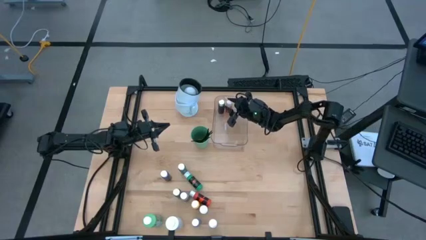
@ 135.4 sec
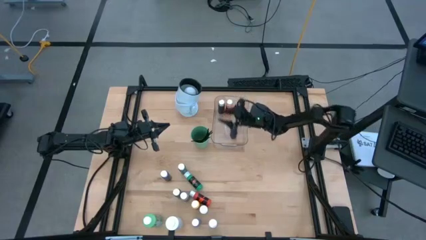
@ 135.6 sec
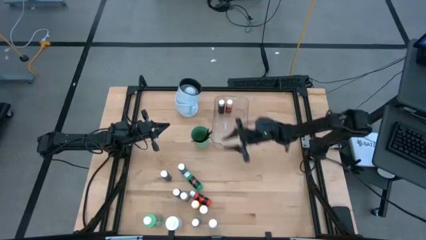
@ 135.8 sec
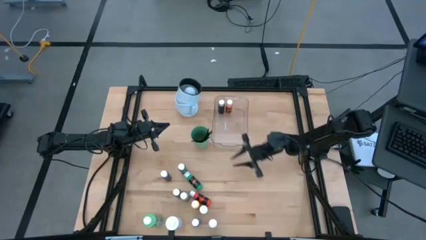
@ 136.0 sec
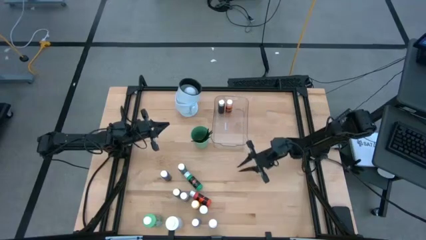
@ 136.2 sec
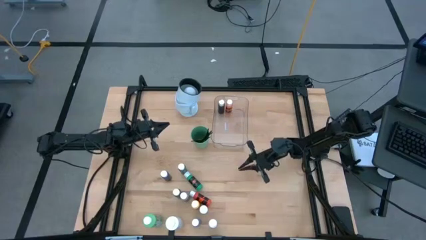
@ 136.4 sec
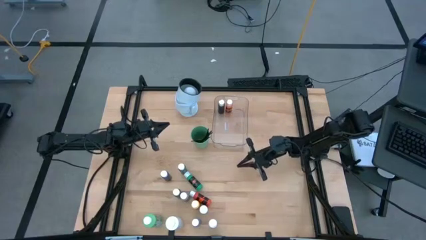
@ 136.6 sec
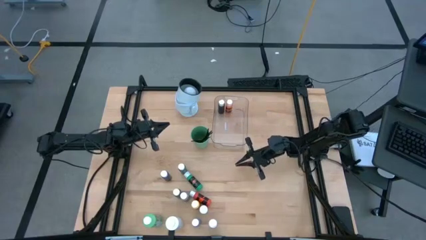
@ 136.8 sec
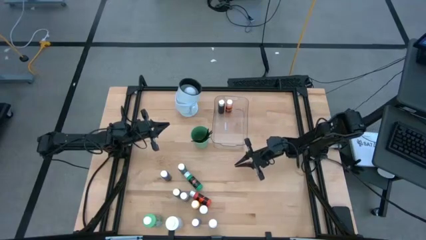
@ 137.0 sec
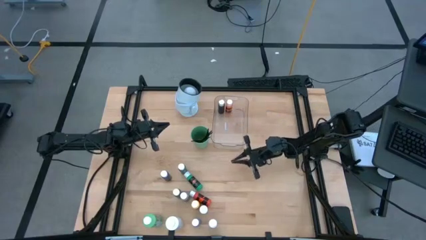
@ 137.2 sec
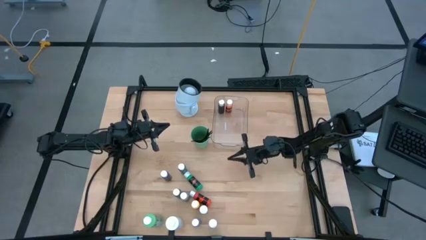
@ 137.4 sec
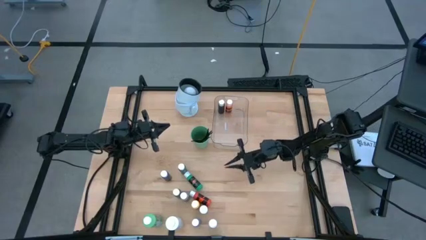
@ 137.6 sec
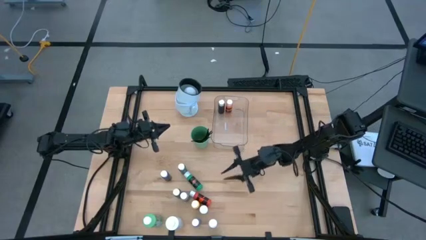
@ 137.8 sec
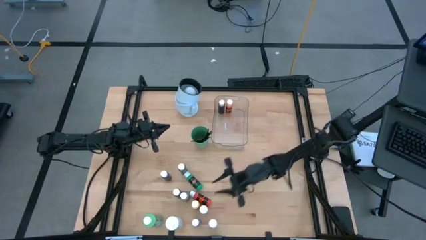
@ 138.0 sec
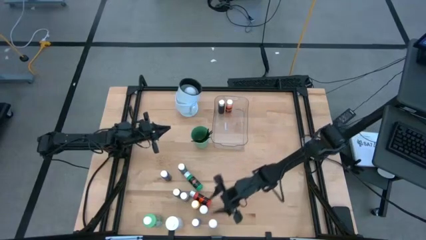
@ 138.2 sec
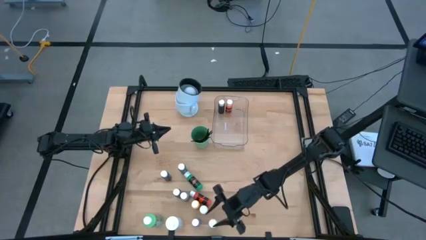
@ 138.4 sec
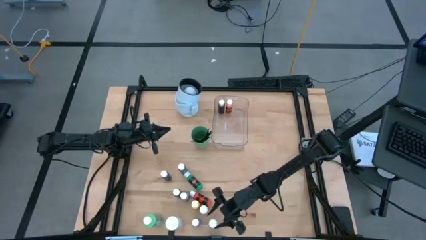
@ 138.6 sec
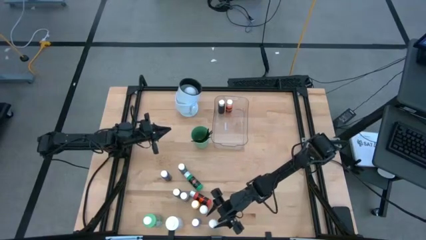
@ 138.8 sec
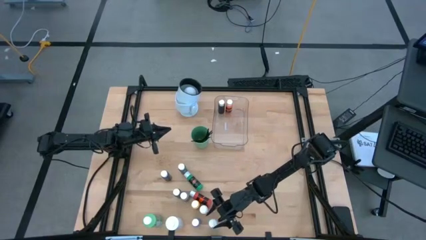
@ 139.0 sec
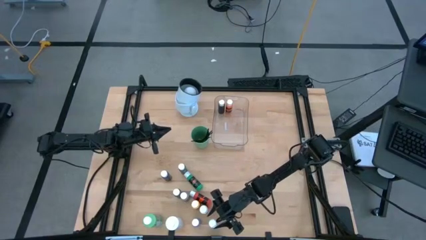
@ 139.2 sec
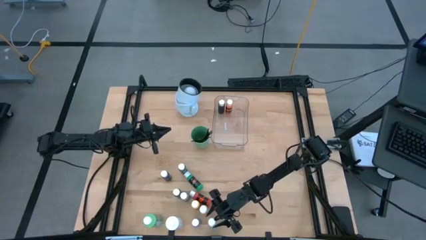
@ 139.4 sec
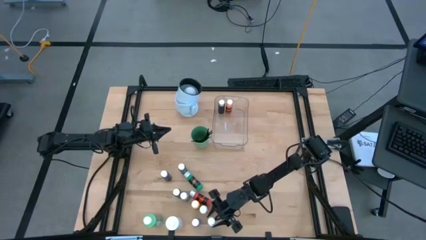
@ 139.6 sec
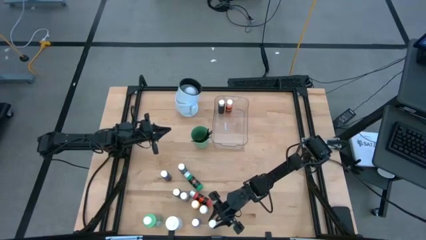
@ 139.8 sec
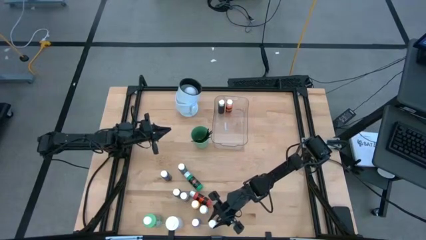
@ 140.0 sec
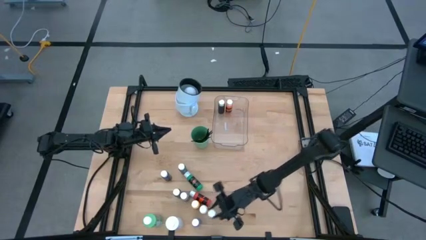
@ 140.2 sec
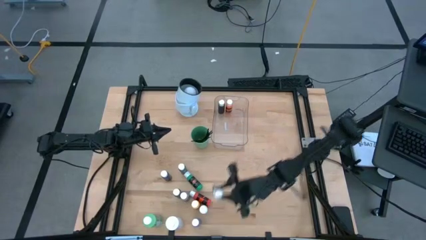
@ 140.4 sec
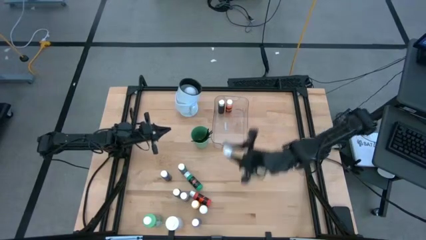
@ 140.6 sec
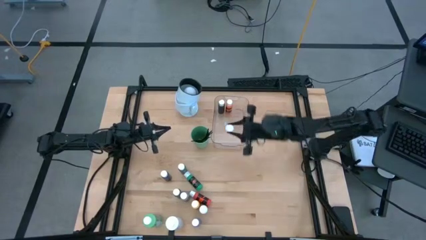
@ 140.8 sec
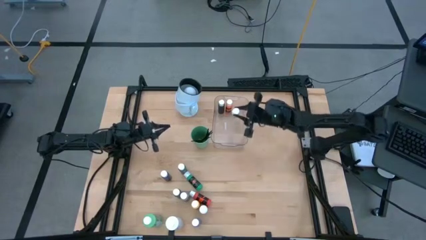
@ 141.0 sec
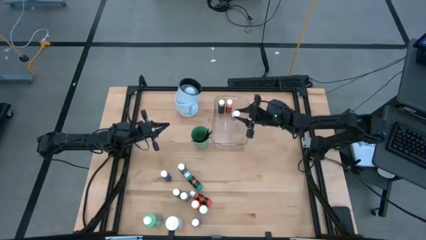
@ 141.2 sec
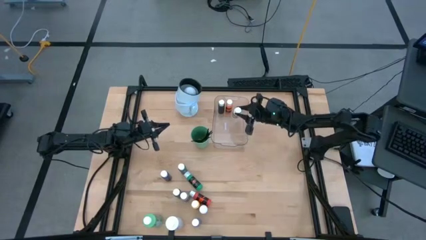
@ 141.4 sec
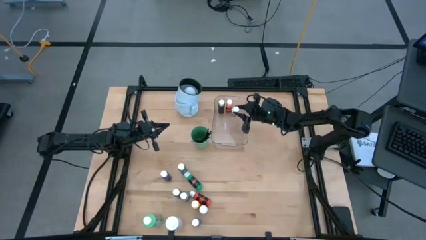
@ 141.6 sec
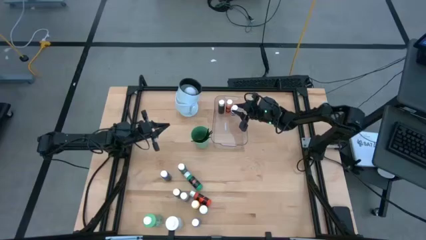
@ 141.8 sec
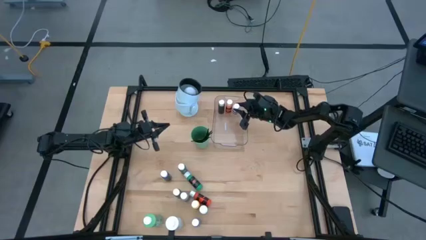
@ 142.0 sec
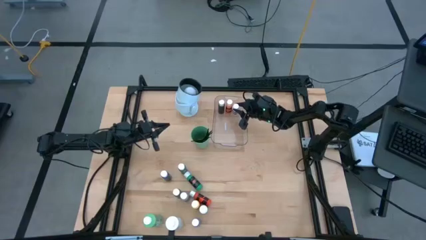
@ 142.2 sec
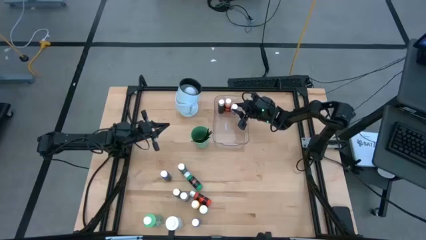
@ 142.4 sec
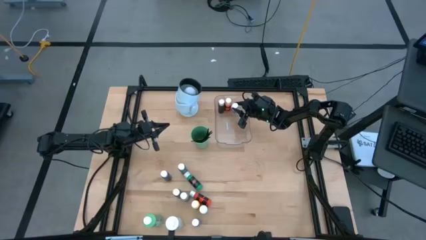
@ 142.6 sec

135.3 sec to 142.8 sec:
Task: Pick & Place Paint Supplies
Put the small white paint bottle into the transparent bin

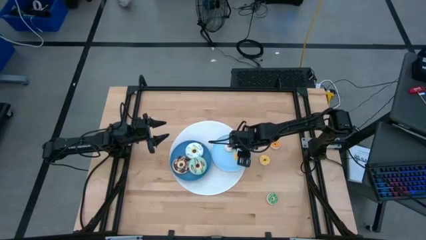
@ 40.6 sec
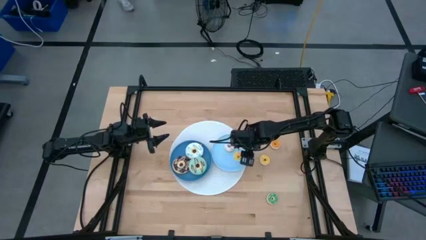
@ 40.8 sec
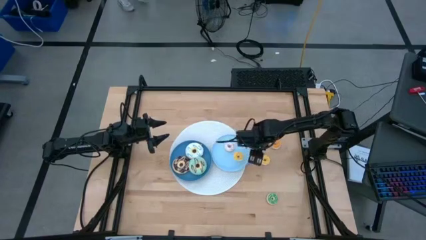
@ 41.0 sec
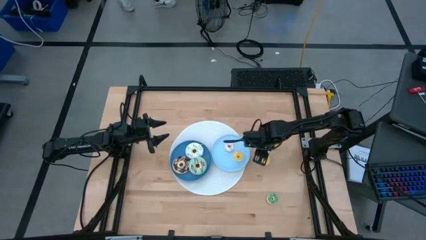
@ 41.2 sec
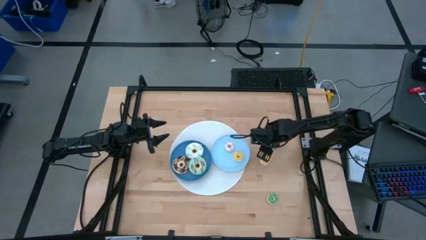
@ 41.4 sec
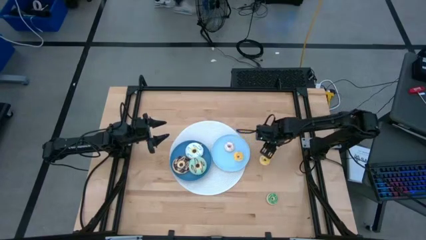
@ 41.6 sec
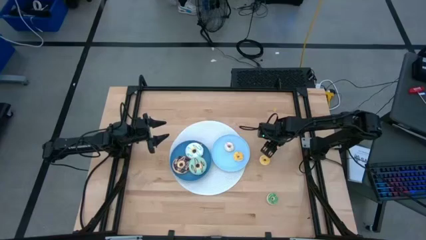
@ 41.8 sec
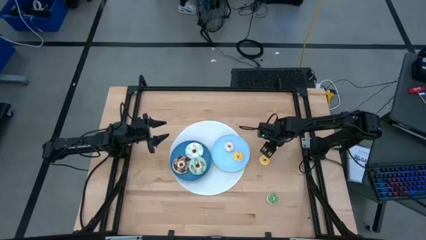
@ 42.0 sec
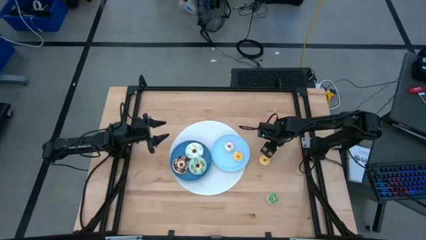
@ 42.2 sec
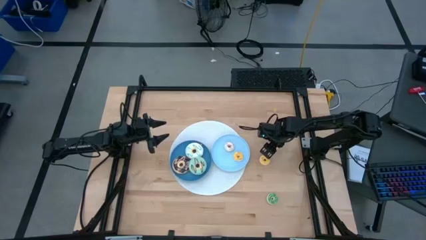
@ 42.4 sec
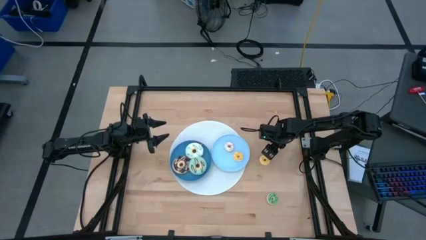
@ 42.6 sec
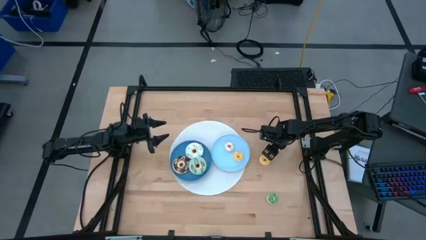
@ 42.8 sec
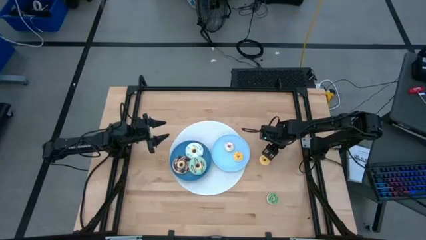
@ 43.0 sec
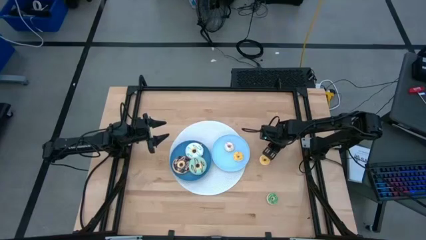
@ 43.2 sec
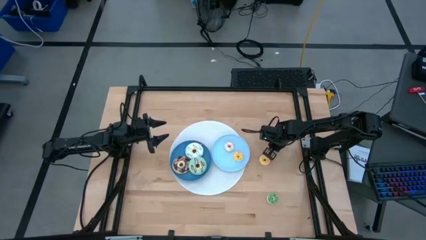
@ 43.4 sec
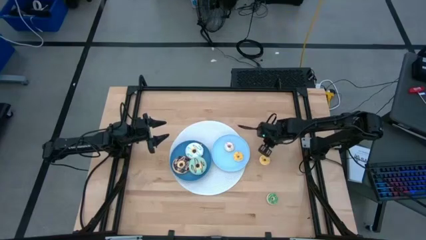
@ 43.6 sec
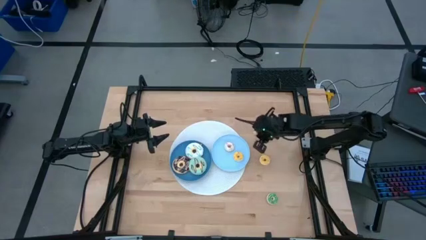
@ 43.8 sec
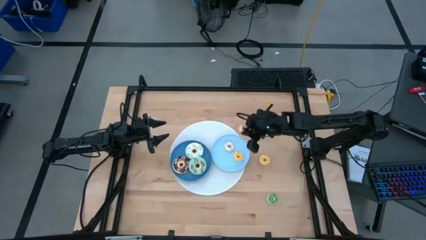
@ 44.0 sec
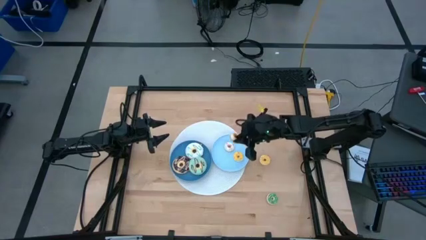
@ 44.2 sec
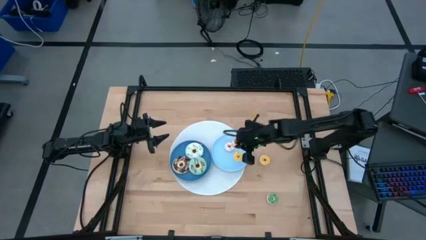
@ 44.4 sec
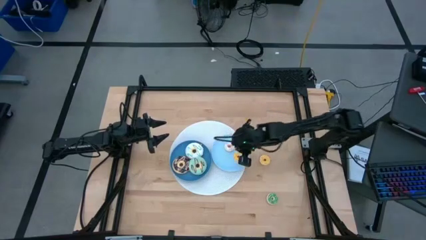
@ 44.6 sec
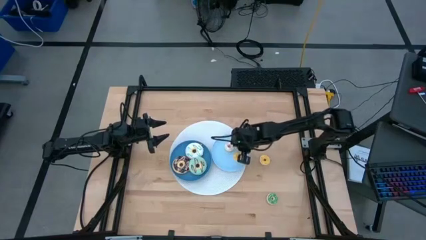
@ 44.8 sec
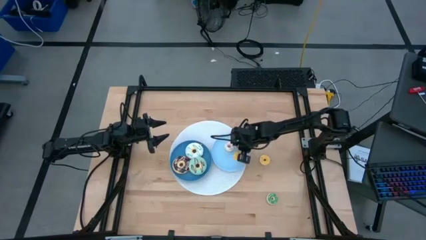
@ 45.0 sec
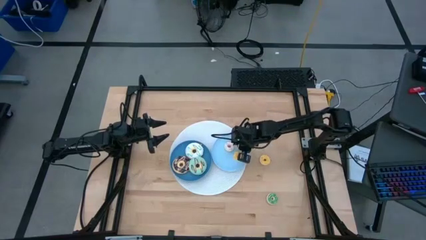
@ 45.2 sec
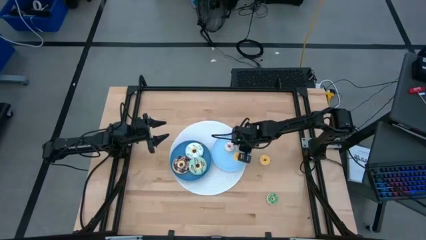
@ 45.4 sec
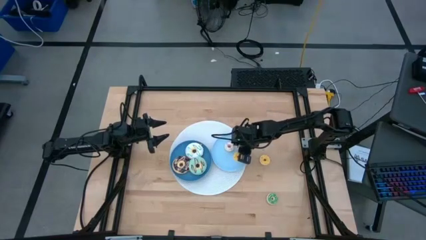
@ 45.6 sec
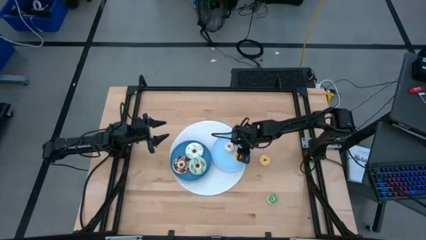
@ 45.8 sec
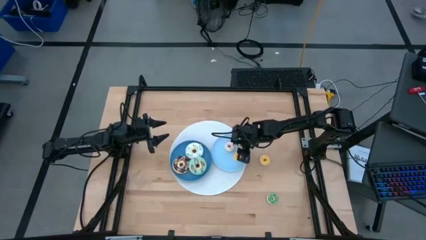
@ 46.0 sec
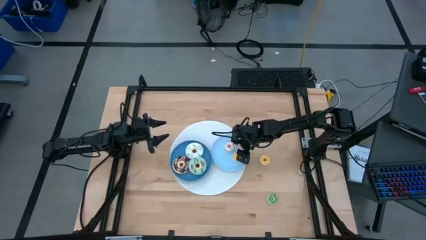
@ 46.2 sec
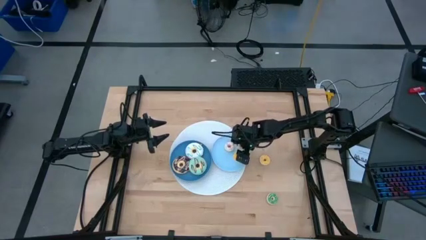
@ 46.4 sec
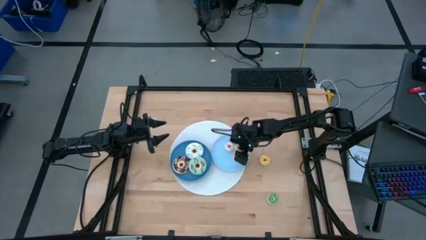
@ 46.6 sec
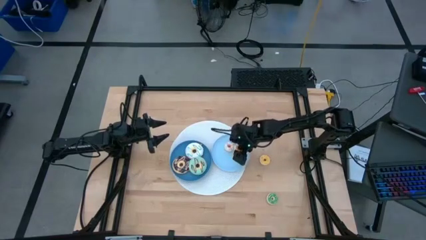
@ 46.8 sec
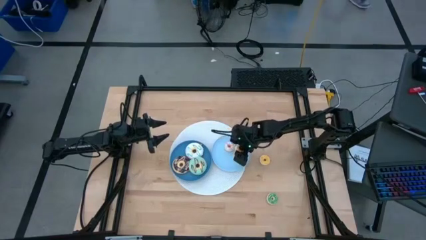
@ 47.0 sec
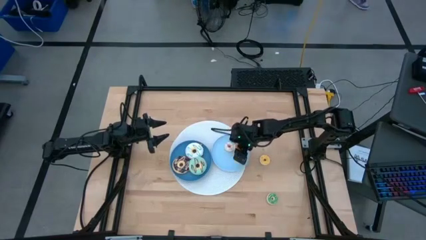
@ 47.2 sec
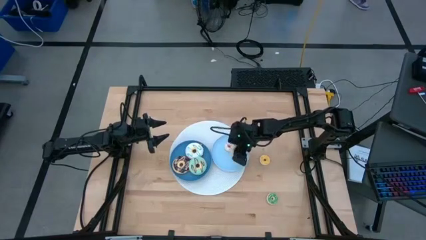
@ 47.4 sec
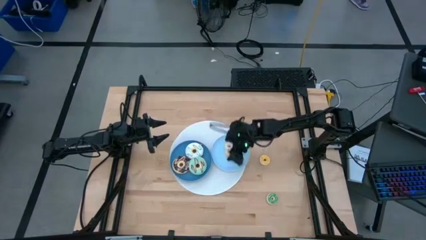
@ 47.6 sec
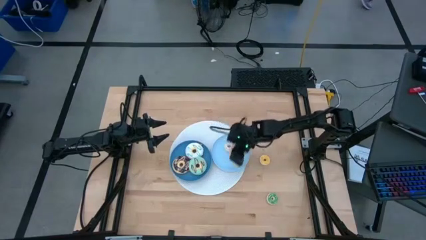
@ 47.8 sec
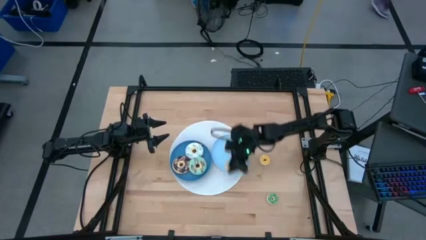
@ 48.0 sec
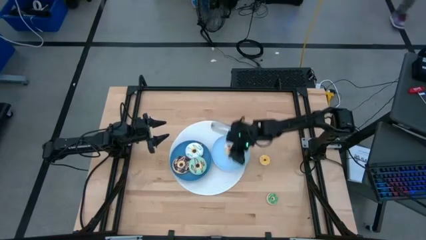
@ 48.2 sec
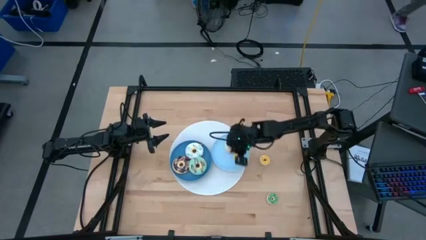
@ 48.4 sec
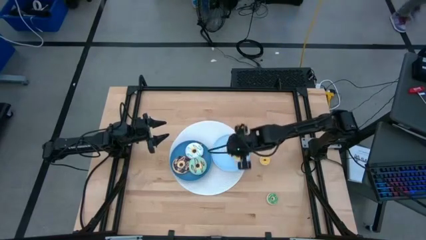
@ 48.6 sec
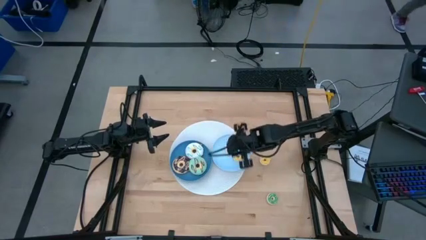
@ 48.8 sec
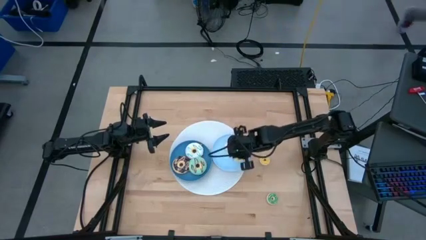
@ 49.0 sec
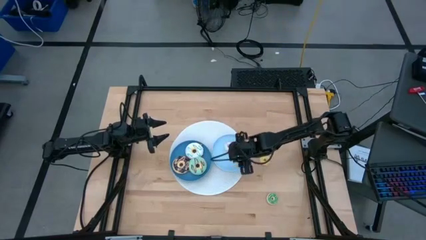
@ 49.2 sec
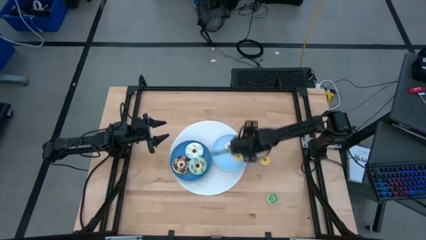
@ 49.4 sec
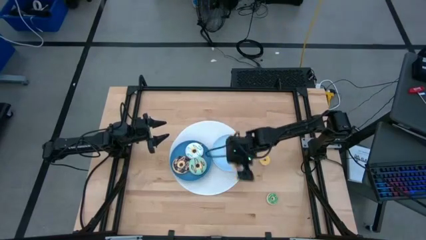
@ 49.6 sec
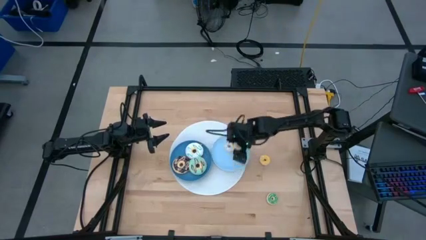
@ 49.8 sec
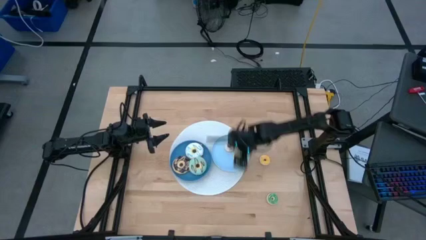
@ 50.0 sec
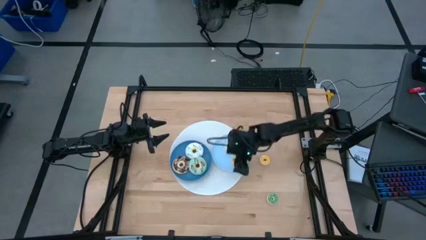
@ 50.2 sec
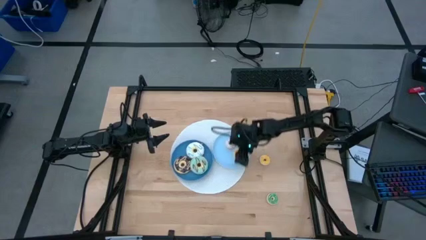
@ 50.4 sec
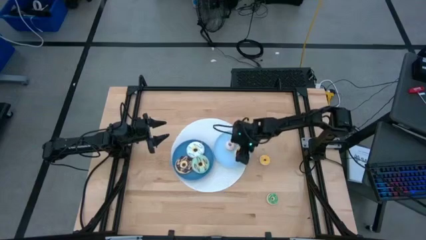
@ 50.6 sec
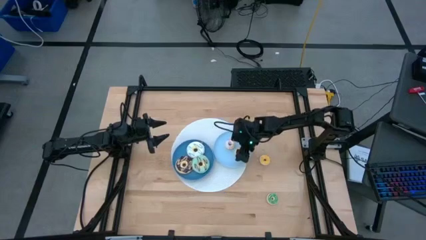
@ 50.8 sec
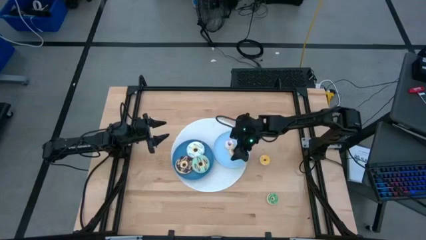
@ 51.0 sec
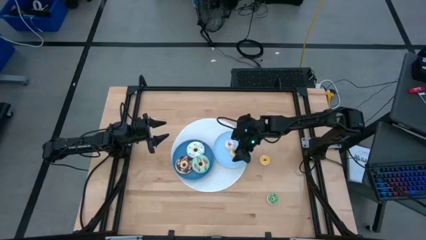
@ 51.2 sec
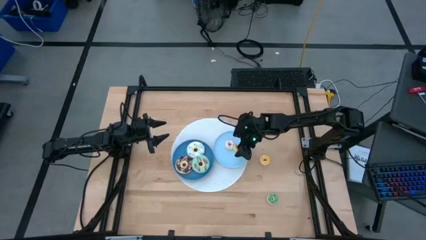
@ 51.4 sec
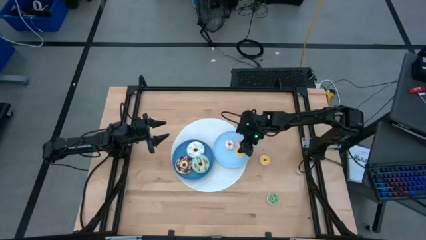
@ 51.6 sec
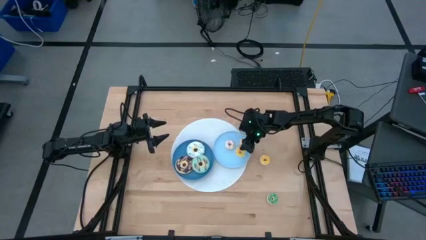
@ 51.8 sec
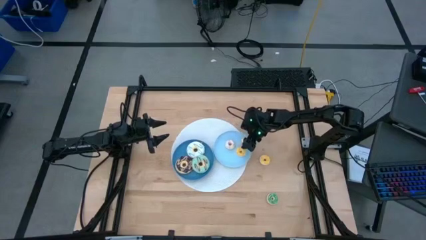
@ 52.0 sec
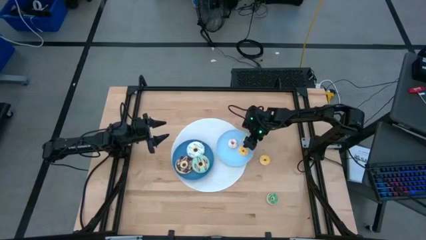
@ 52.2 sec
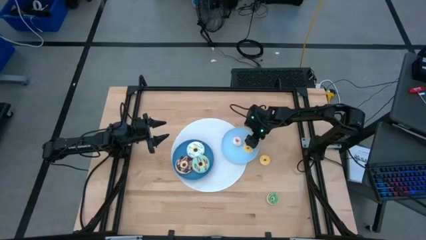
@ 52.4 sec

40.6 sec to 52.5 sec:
Task: Pick & Place donuts
Put the small orange donut on the light blue plate
